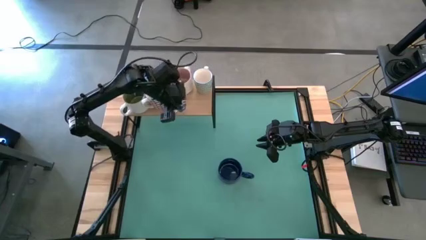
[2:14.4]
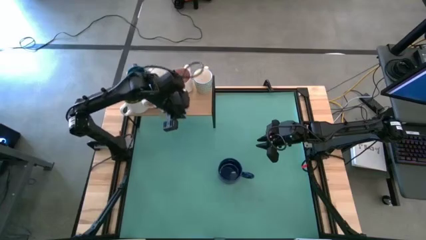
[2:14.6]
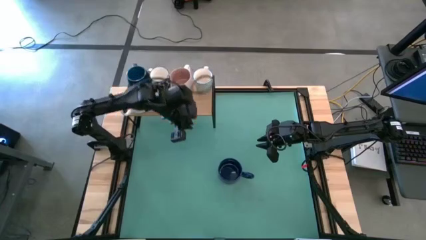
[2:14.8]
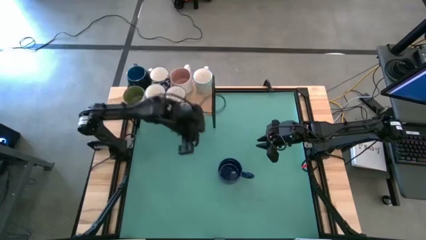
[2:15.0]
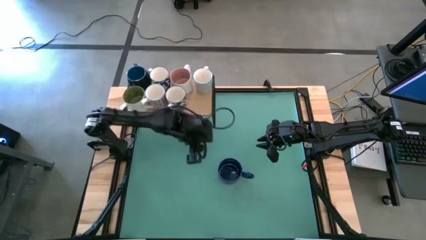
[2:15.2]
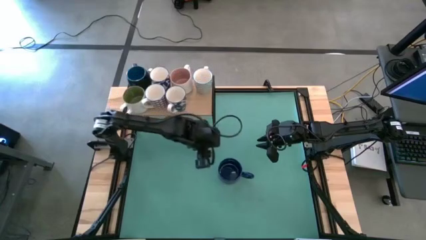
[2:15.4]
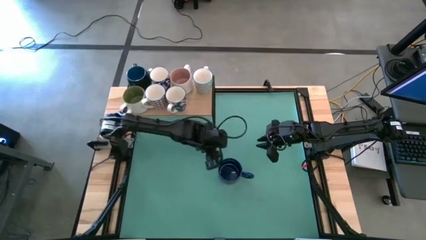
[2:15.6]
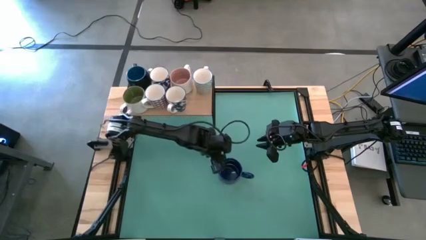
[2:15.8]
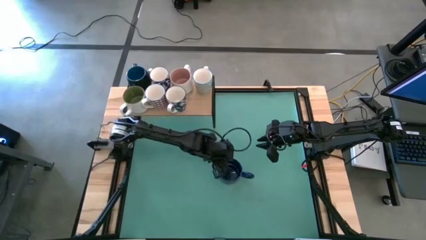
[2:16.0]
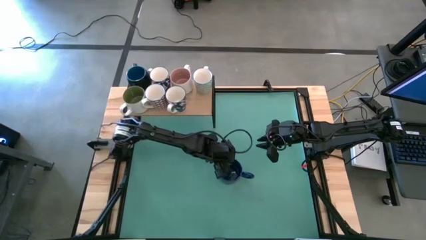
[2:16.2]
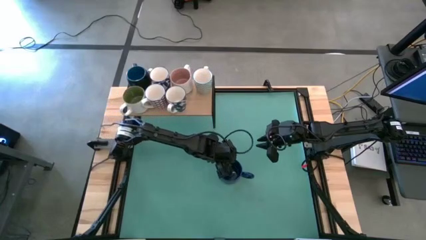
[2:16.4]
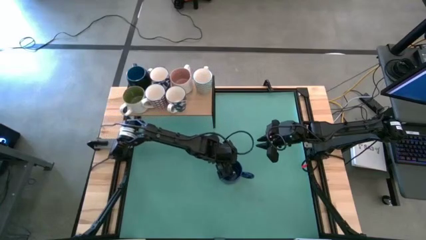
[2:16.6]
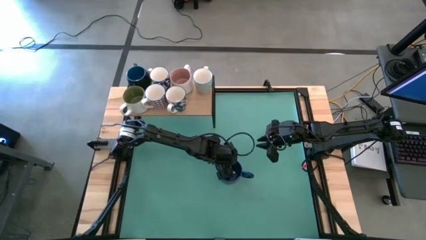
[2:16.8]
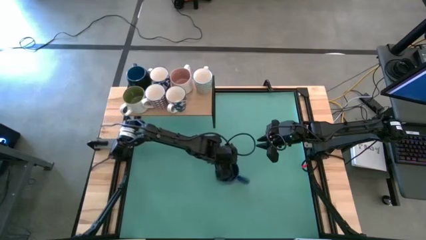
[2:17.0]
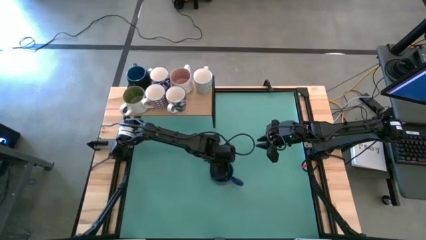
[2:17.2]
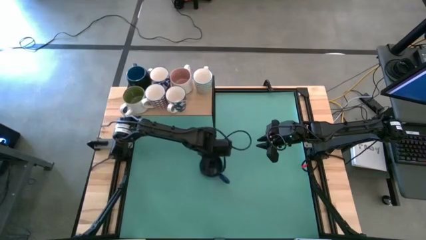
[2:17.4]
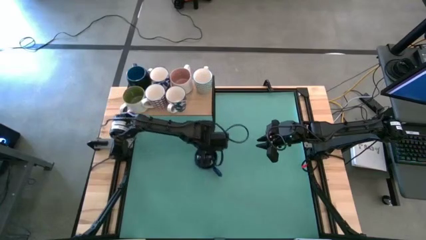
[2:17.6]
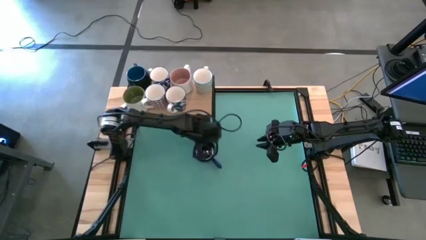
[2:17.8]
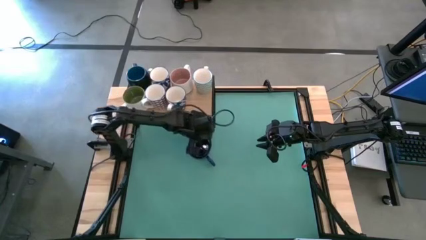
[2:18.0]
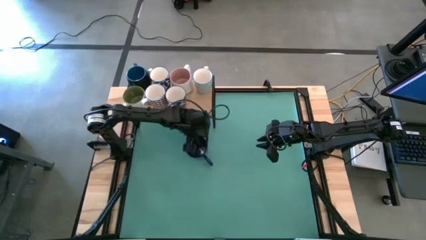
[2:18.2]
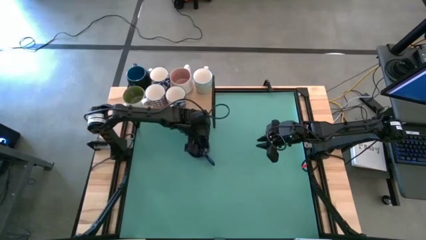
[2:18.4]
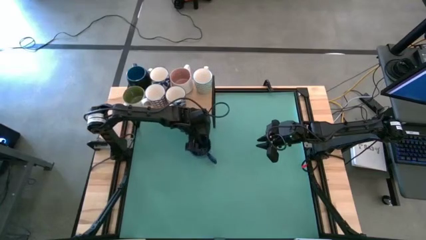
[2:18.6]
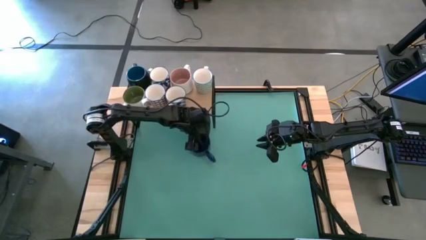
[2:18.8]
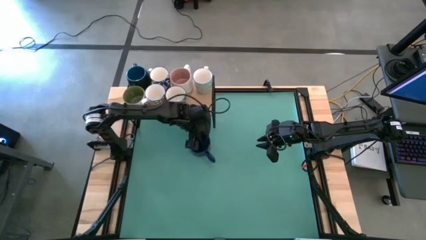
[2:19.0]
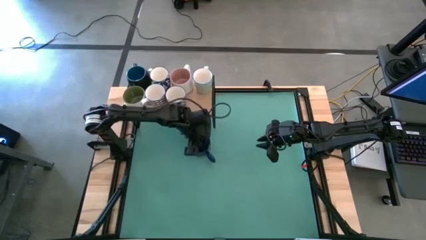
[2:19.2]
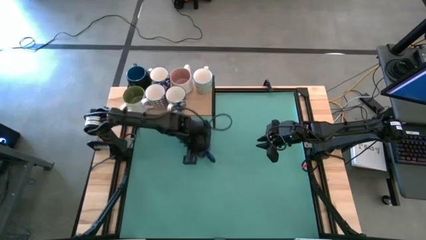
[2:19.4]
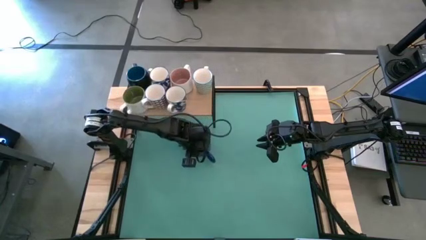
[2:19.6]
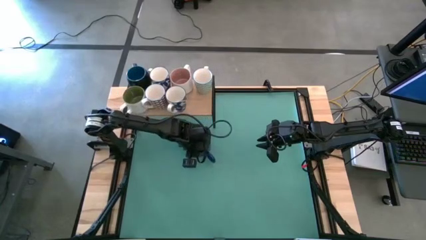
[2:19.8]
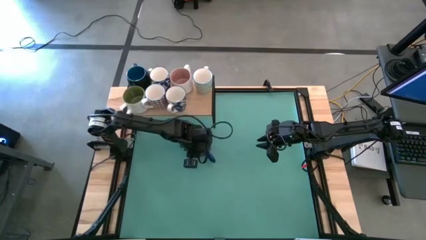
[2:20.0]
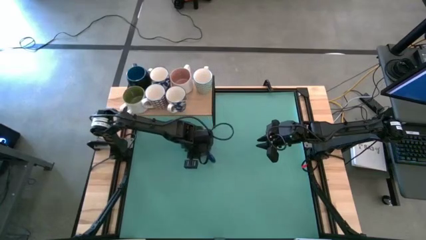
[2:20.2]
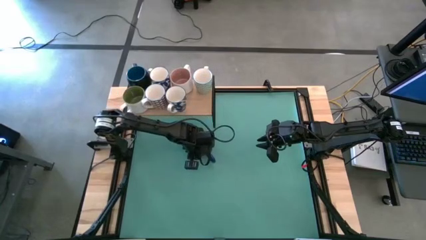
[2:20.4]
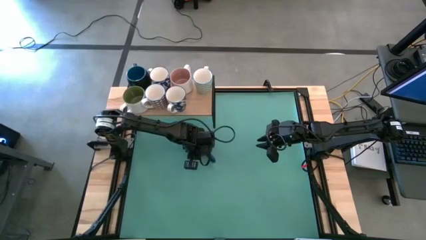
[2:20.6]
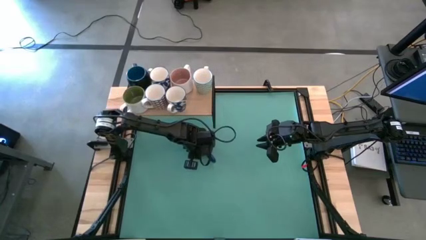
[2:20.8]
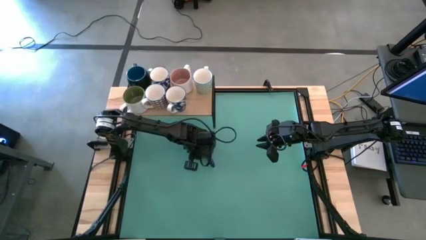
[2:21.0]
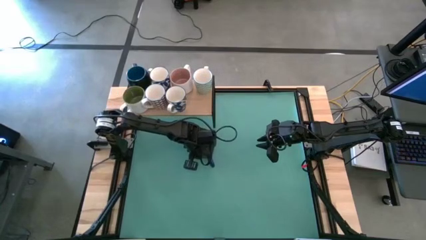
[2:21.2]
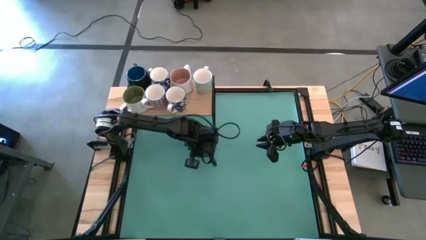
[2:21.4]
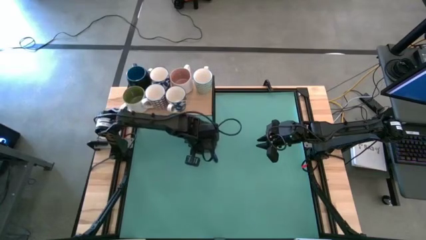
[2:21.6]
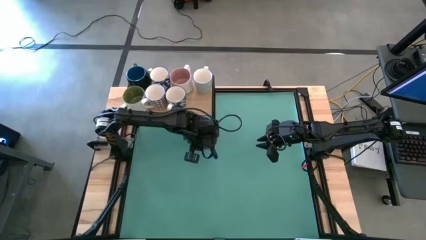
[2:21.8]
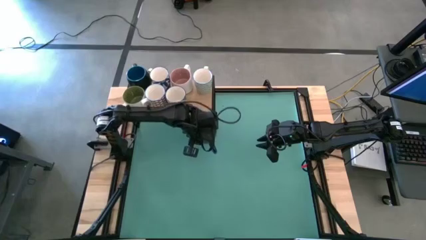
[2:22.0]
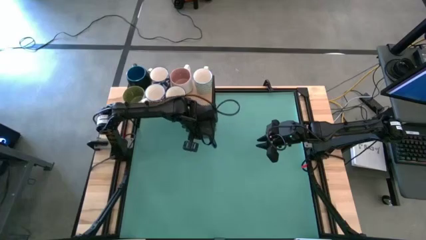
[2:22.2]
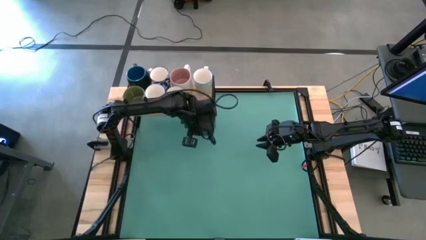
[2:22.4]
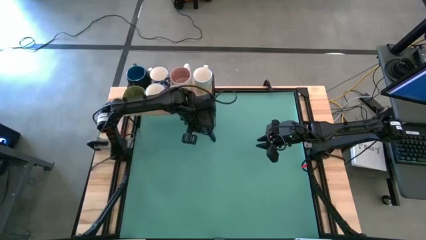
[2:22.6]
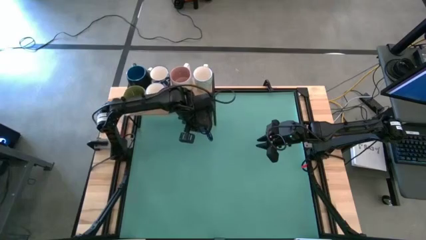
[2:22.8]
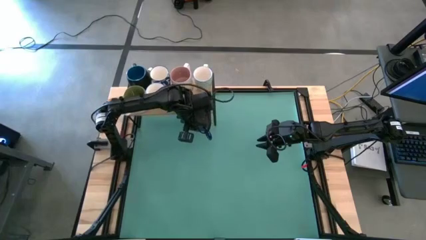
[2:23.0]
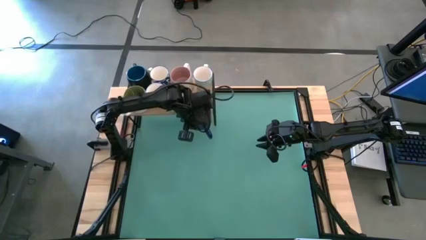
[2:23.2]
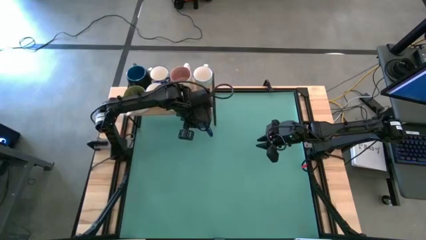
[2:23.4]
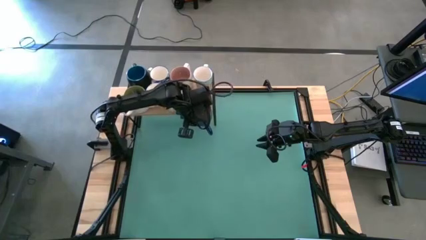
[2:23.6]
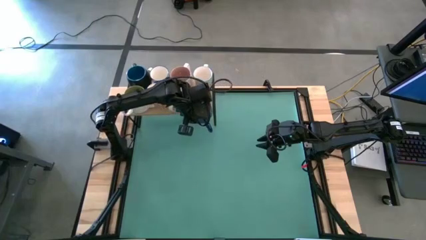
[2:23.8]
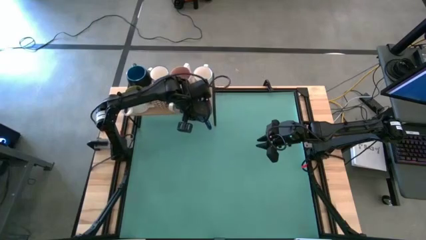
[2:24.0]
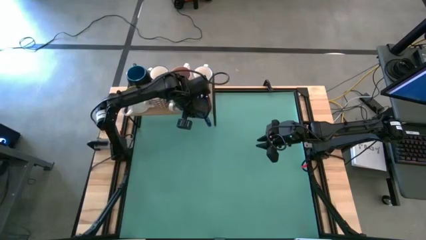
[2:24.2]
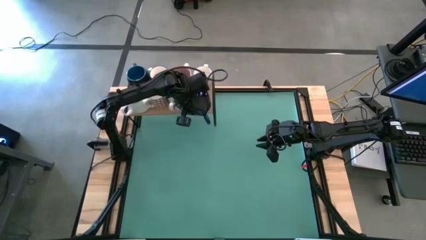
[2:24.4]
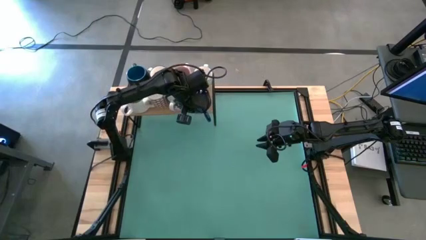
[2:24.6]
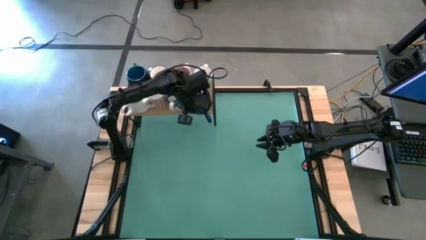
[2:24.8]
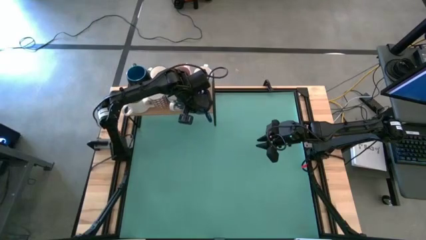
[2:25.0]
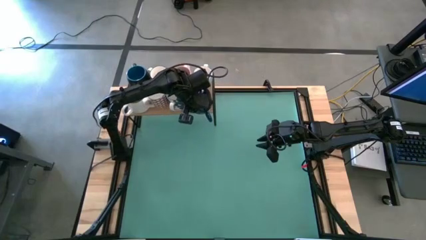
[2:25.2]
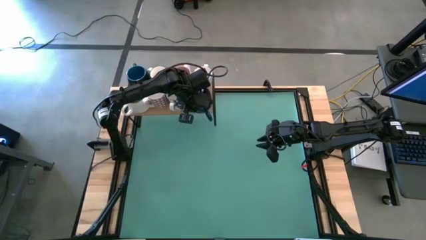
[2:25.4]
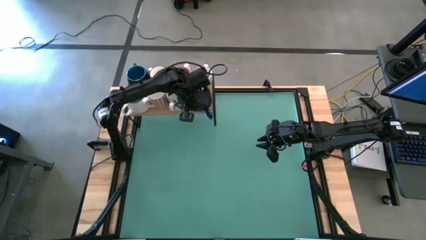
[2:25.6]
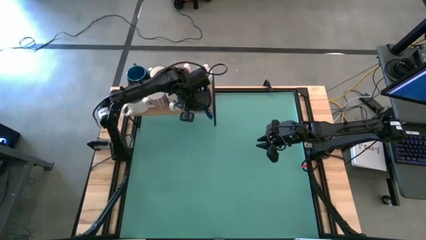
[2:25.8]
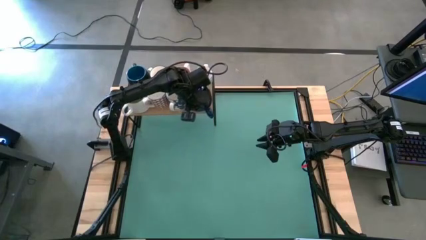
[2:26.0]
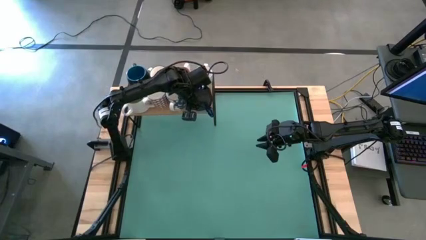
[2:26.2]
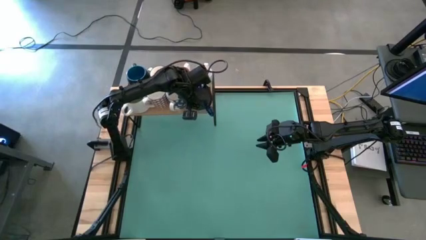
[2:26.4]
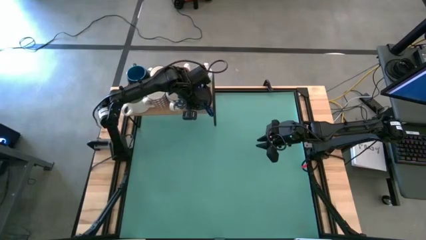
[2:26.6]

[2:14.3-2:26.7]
Task: Place coffee mugs
Put the blue mug on the shelf

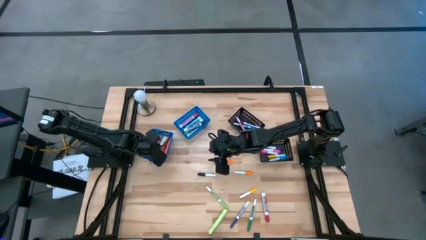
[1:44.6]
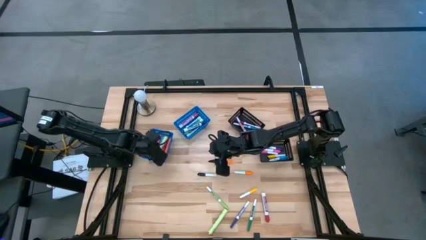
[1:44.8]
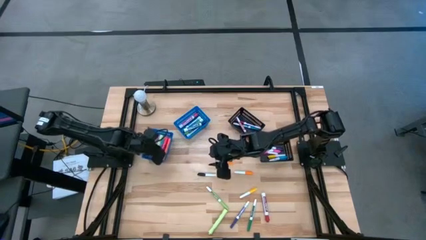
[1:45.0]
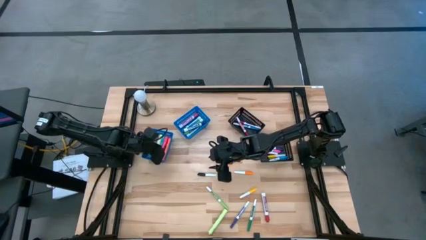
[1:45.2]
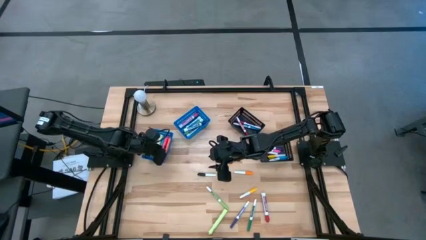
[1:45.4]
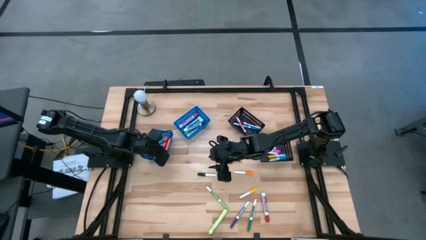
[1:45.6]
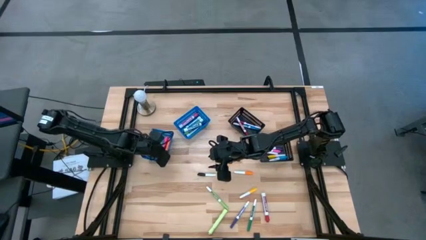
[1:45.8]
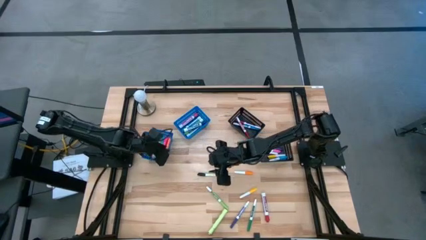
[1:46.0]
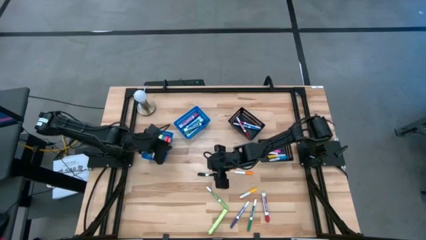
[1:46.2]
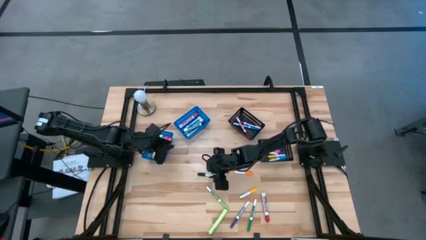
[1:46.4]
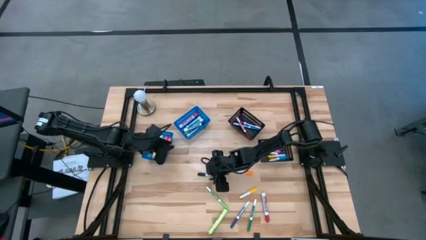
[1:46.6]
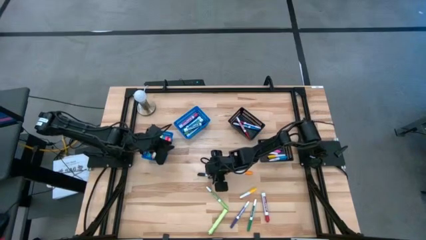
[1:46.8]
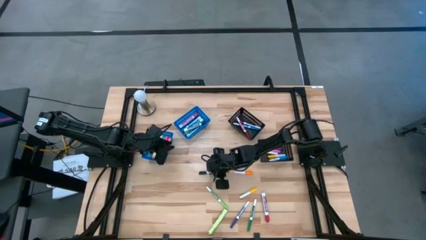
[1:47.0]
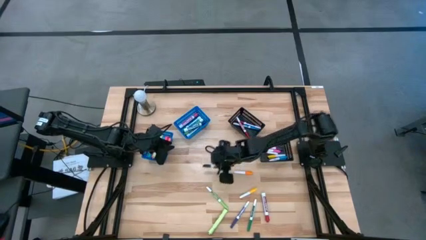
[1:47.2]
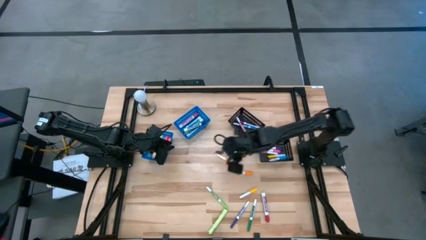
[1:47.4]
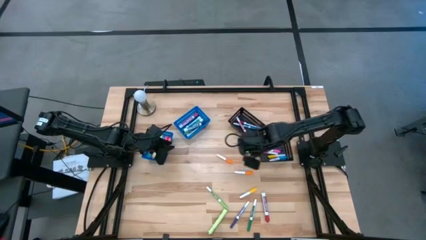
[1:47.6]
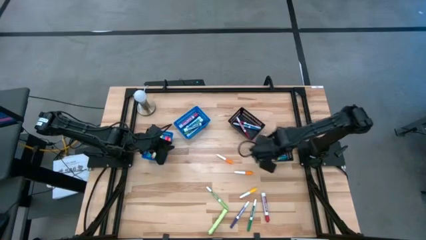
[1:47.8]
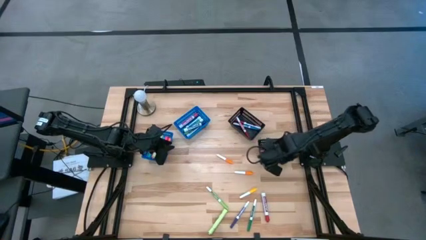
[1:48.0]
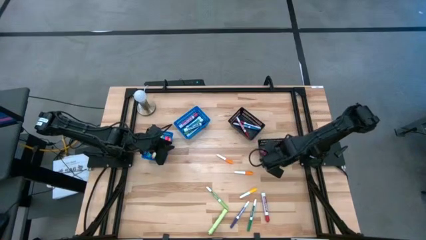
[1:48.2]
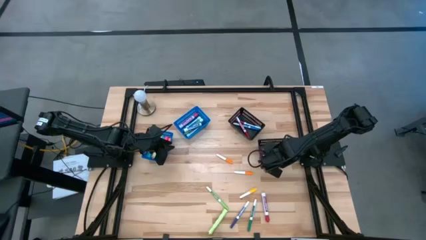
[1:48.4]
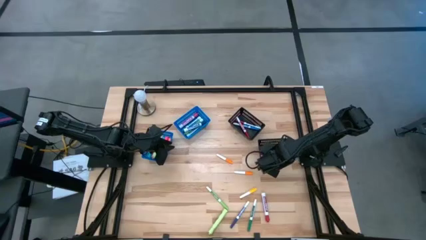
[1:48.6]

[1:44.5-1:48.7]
Task: Pick & Place Markers
Put the black highlighter pen into the bottom black bin
